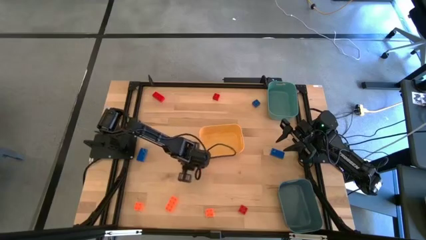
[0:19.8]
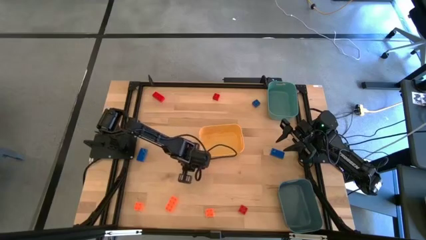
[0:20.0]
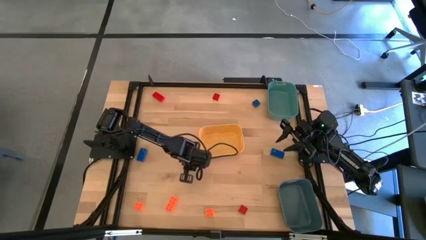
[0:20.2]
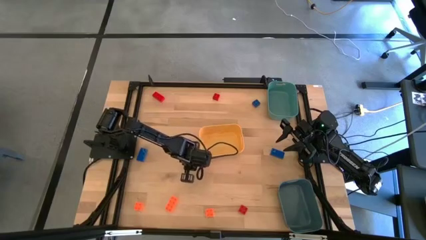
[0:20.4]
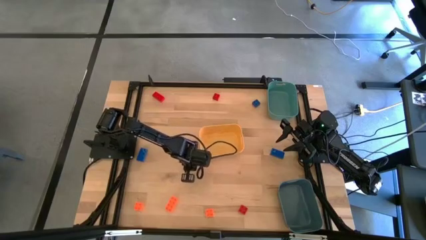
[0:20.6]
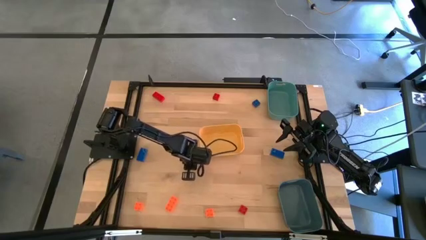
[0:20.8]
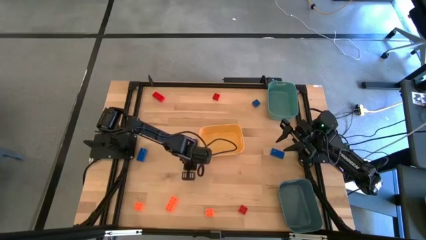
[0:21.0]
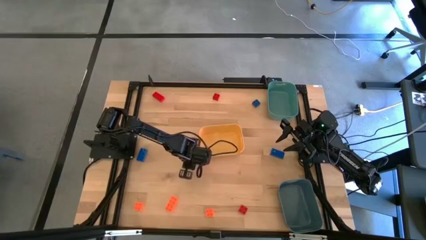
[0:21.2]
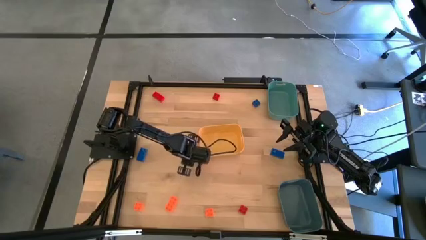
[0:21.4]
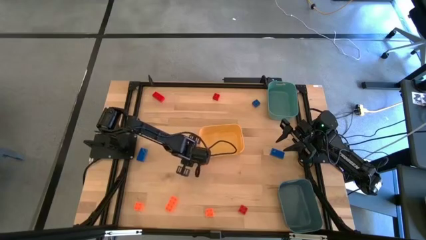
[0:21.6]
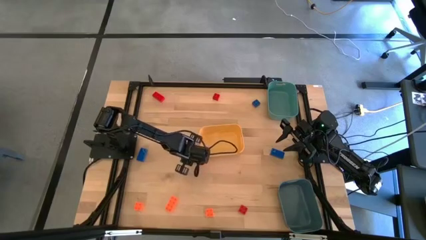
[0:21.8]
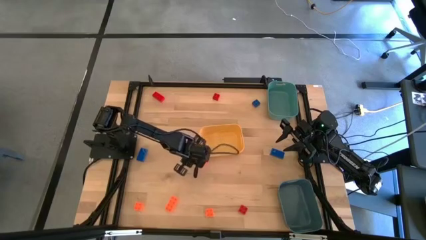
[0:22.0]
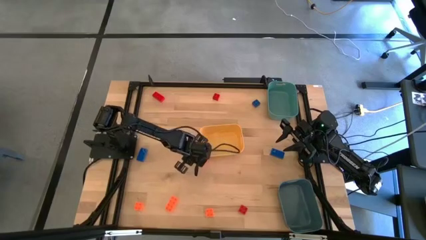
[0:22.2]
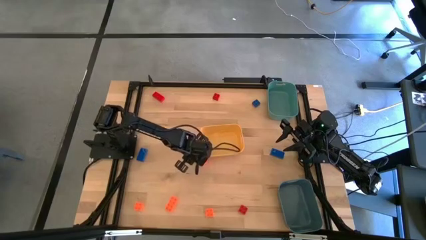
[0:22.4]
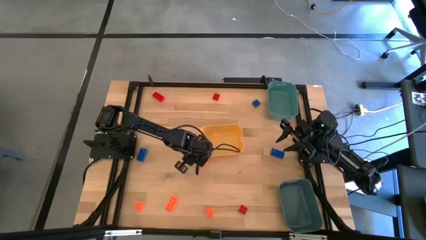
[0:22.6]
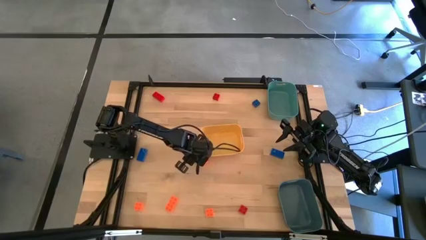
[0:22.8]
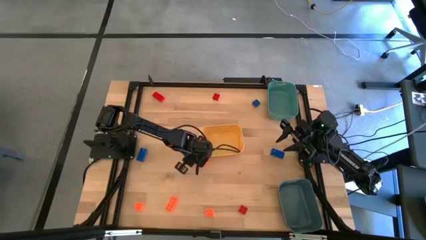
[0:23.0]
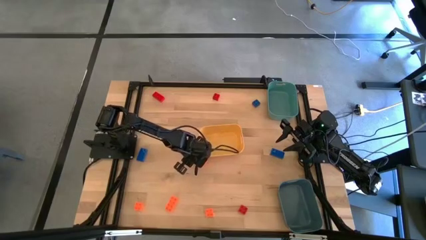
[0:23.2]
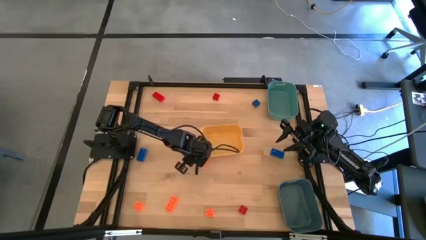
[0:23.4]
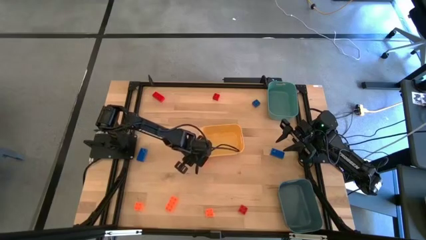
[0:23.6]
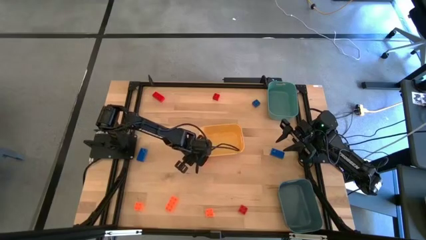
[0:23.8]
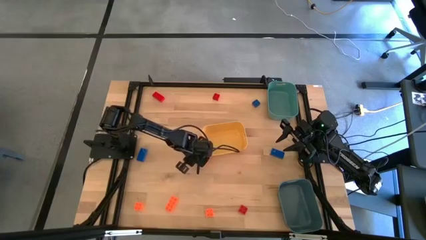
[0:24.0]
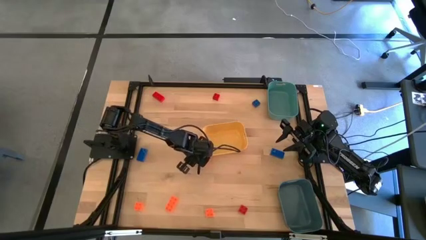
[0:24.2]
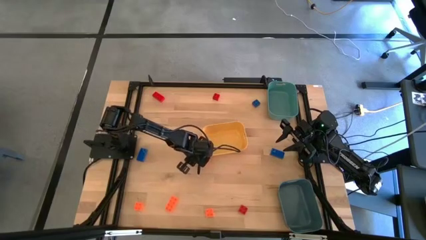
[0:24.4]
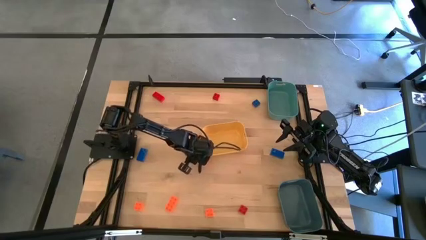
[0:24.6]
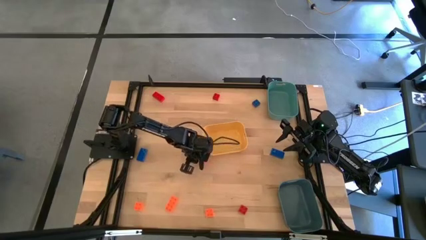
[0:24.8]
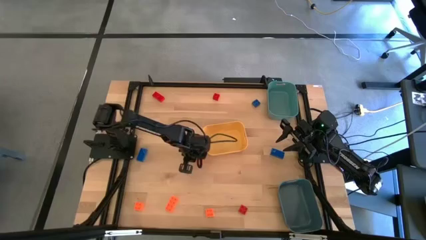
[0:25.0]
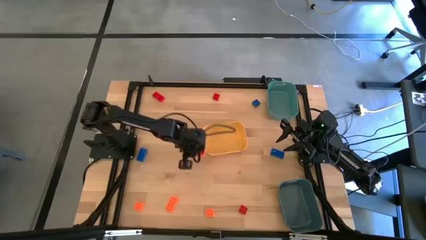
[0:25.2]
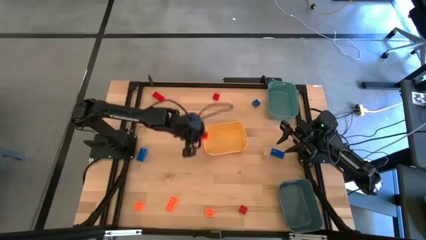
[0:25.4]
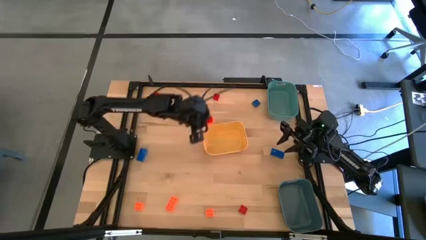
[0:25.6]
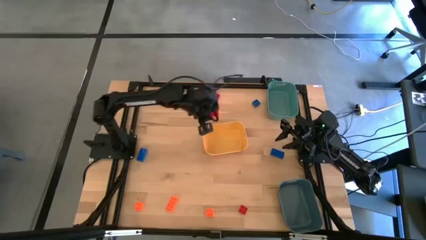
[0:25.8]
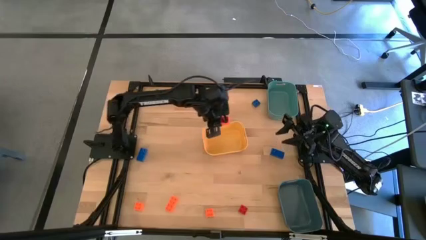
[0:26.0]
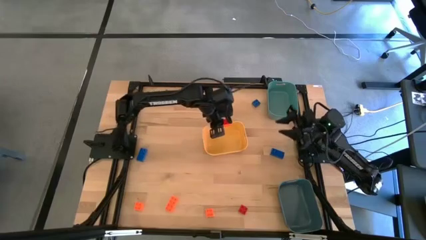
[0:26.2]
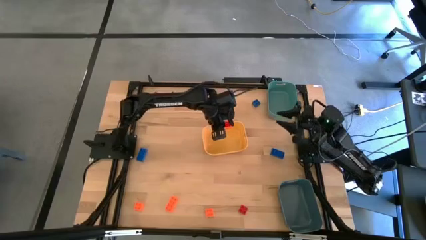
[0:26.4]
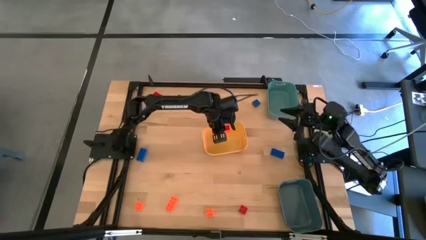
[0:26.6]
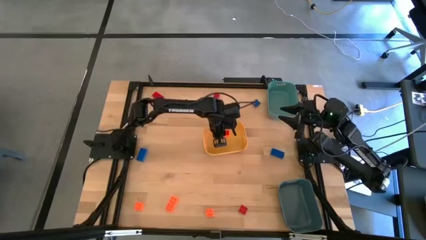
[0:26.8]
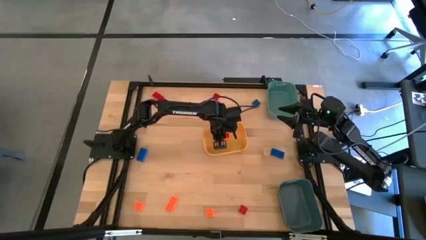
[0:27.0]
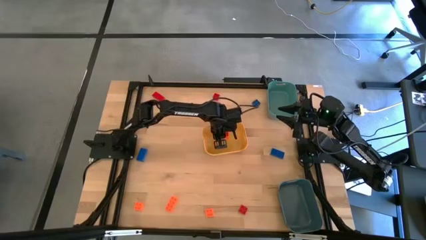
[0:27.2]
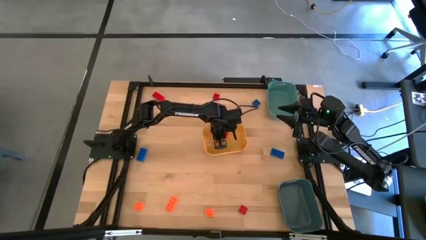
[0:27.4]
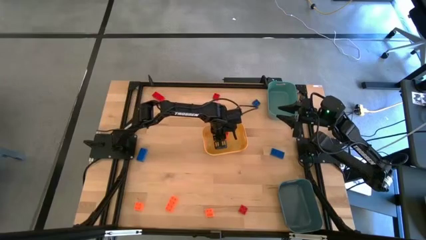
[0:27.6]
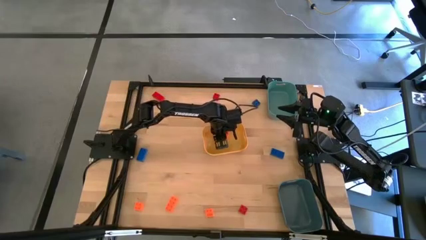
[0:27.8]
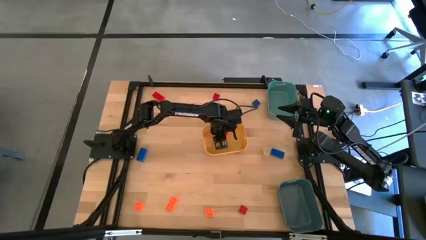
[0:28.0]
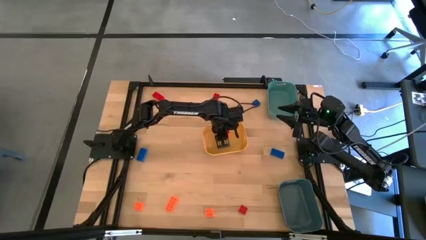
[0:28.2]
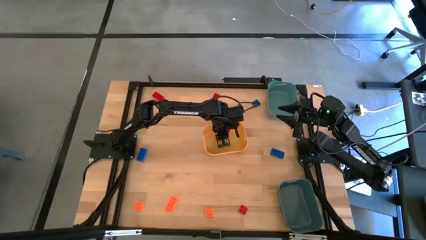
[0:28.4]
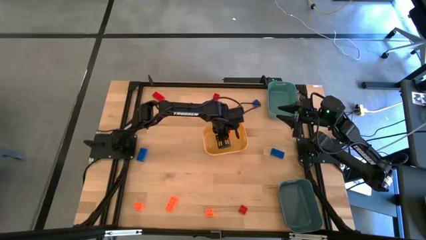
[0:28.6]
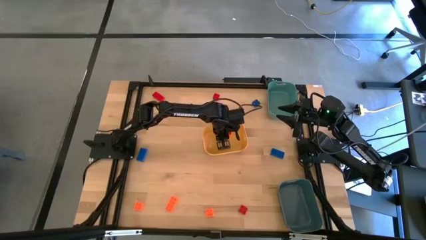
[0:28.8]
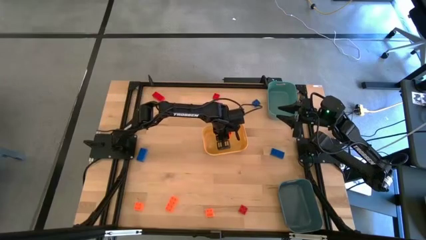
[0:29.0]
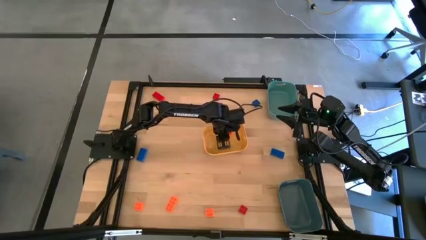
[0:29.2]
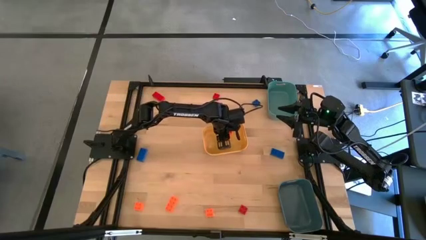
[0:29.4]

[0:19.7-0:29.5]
Task: Sort & place blocks by color
Put the orange game piece into the yellow bin

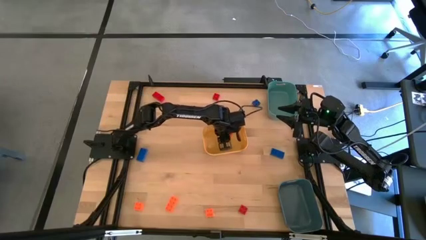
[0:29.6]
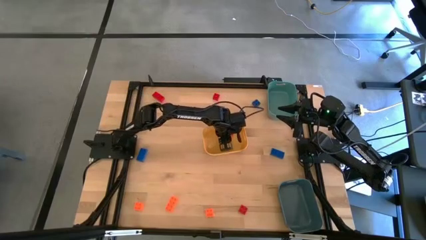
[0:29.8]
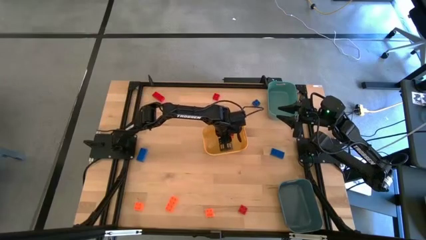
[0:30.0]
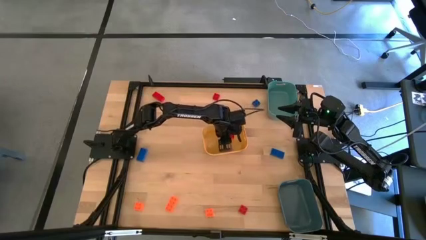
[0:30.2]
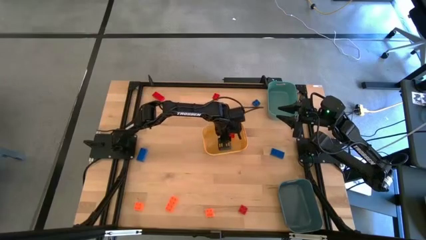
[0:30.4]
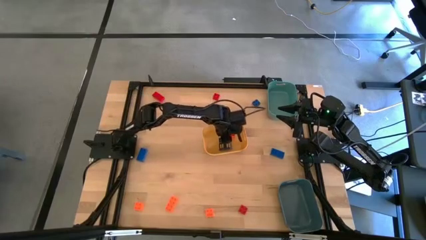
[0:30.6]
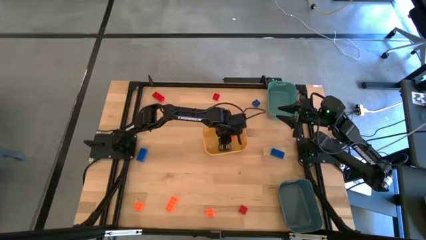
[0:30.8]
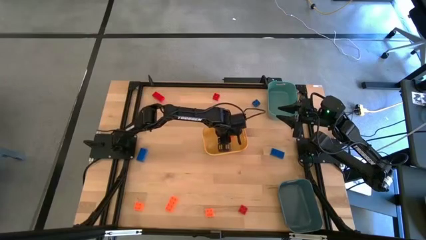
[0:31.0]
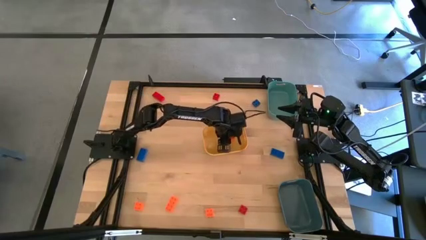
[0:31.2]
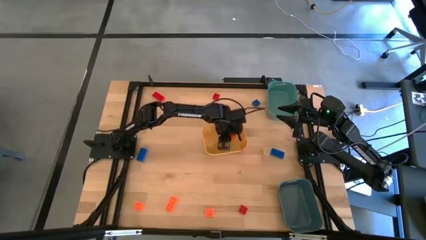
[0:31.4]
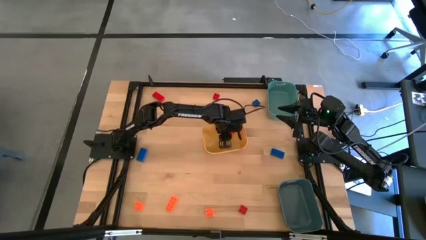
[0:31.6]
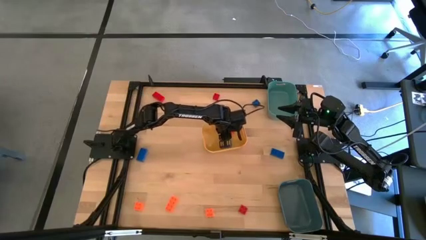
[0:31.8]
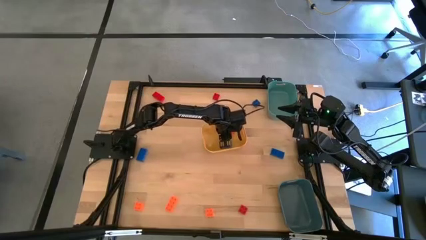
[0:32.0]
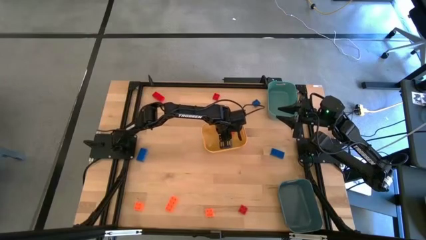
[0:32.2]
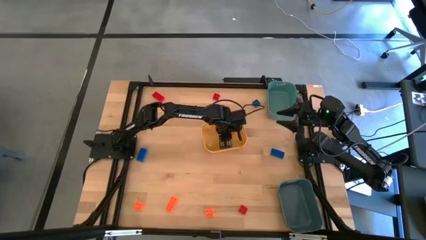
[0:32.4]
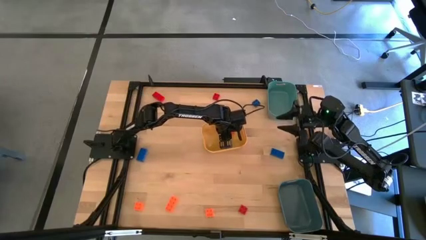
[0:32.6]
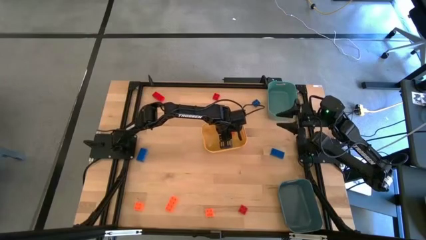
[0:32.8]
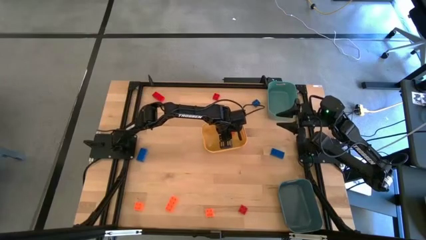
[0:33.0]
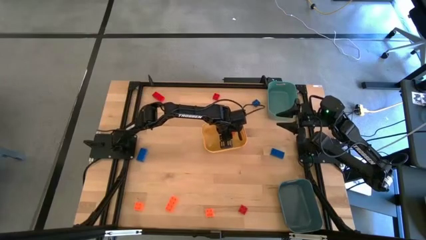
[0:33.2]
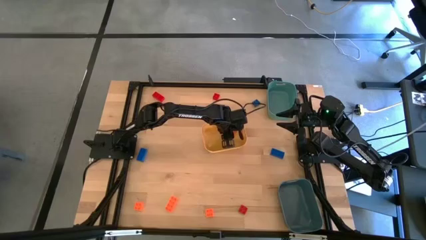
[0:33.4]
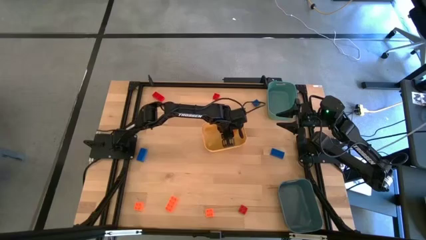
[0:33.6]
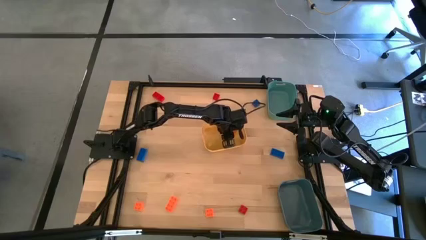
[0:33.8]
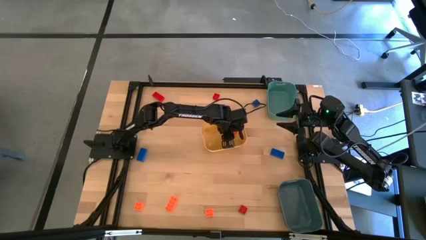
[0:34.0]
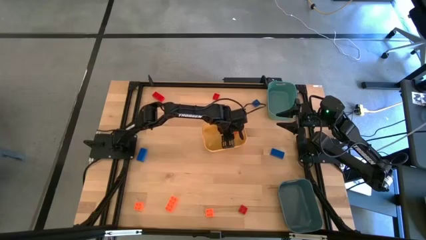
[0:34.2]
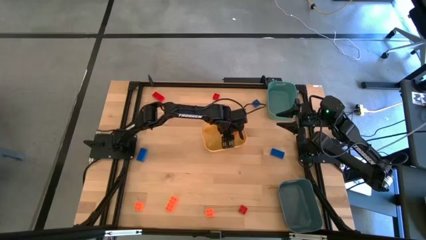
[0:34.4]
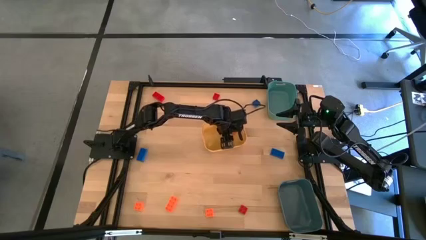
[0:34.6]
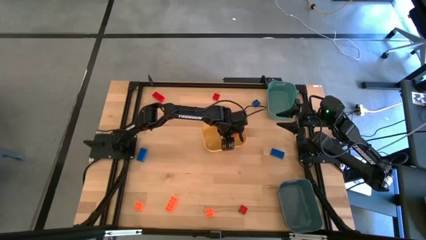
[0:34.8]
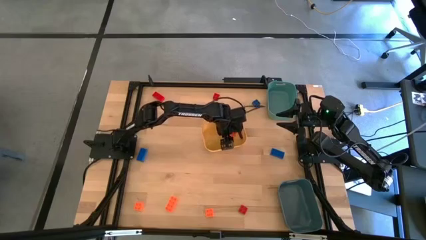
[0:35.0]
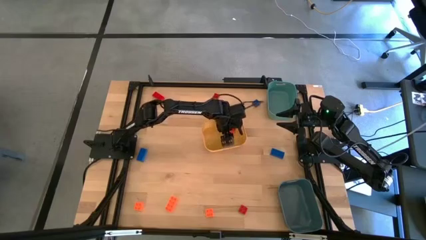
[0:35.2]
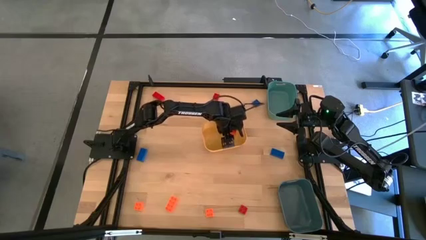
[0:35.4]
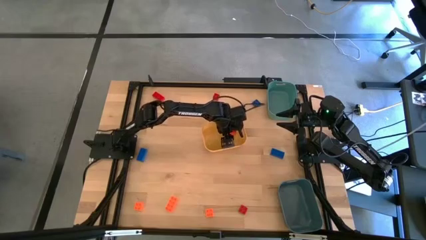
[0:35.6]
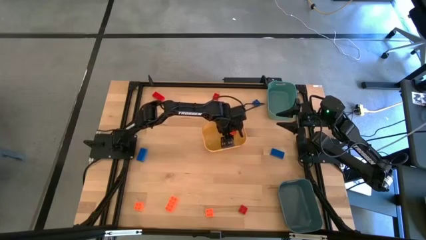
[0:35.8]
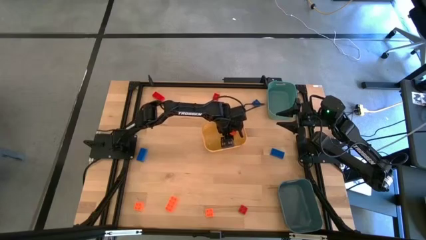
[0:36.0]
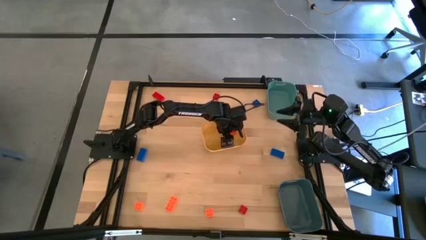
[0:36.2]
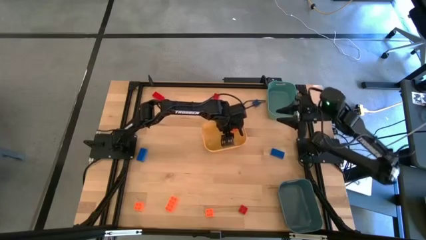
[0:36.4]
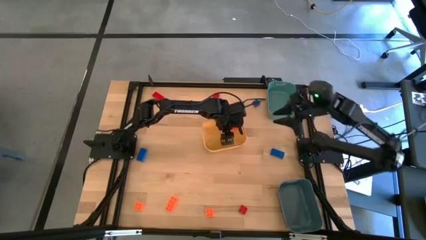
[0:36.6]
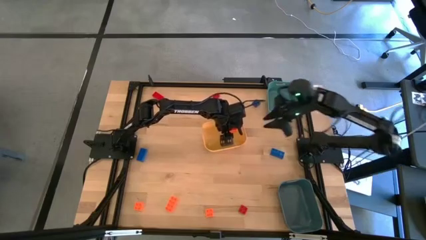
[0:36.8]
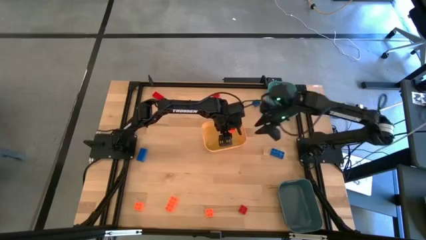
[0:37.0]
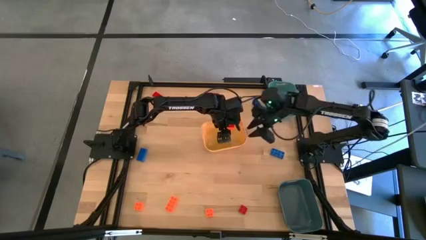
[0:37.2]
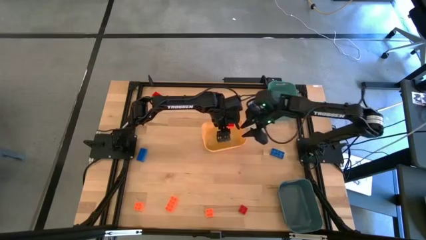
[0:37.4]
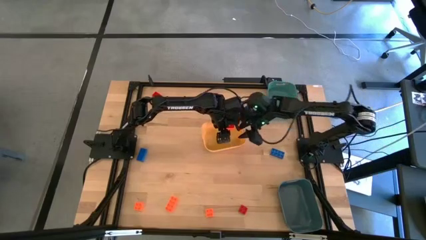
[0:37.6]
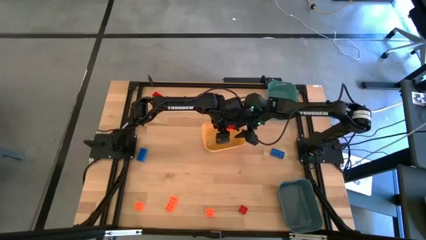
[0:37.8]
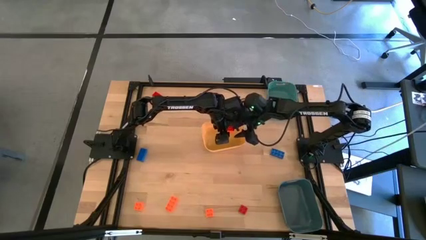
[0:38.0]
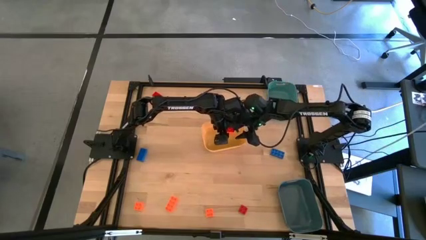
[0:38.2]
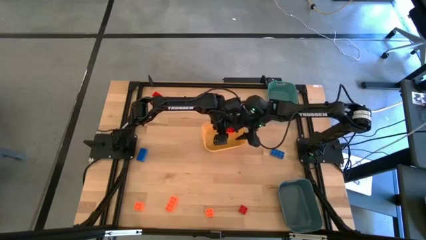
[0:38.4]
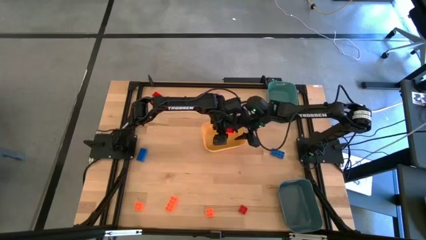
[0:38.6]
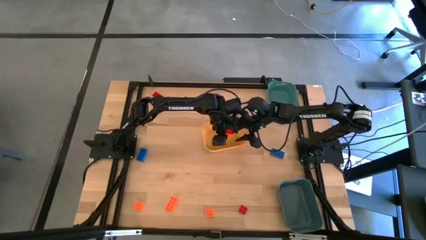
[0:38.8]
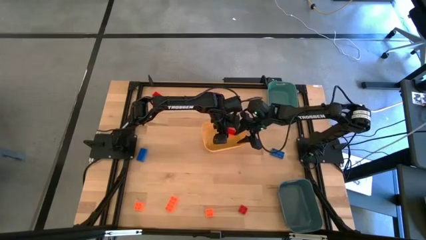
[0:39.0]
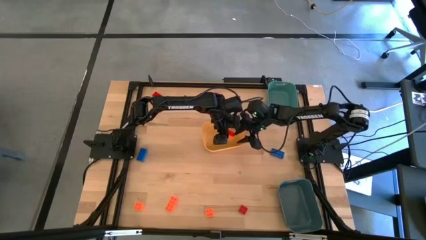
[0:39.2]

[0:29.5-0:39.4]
Put the orange game piece into the yellow bin
